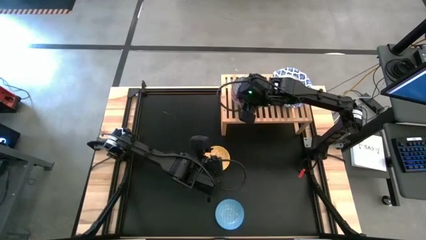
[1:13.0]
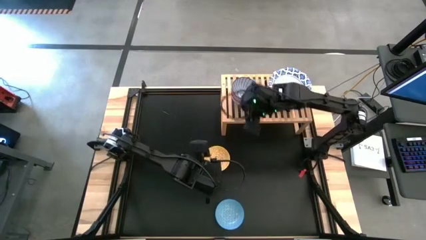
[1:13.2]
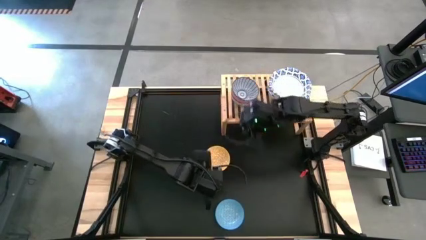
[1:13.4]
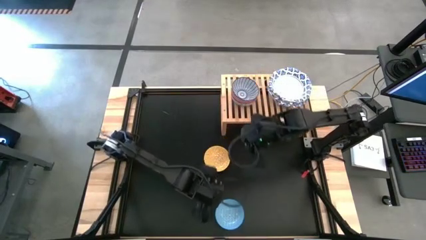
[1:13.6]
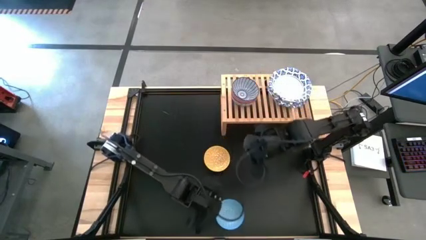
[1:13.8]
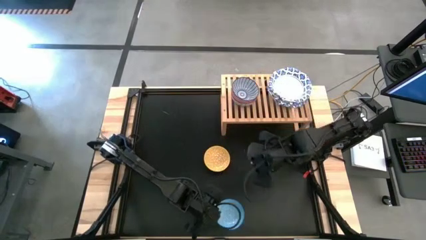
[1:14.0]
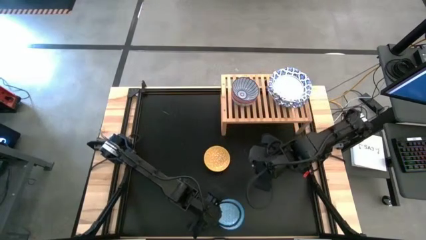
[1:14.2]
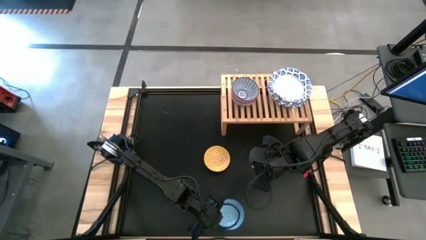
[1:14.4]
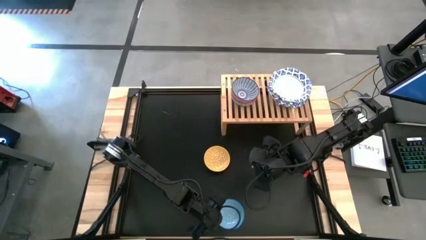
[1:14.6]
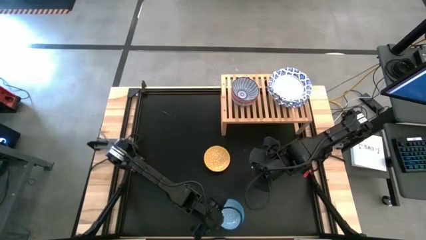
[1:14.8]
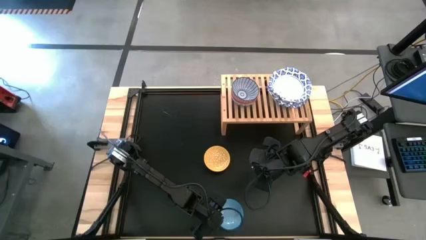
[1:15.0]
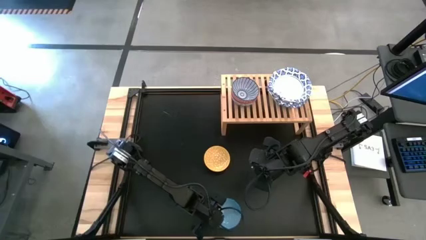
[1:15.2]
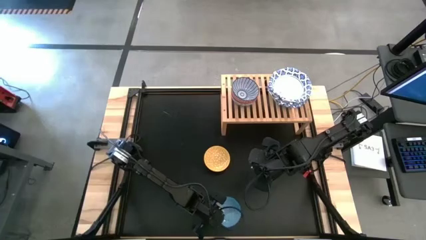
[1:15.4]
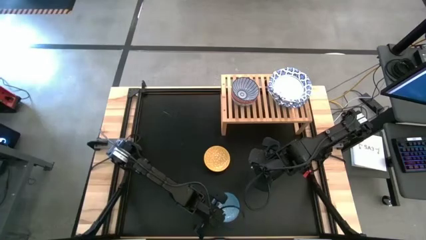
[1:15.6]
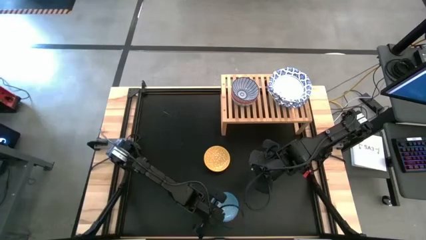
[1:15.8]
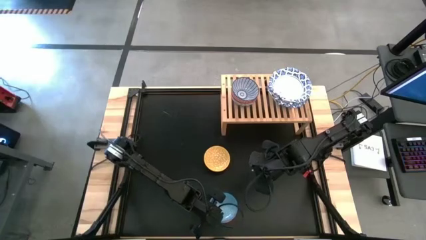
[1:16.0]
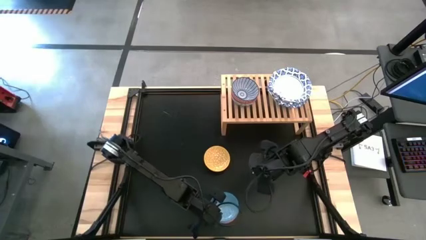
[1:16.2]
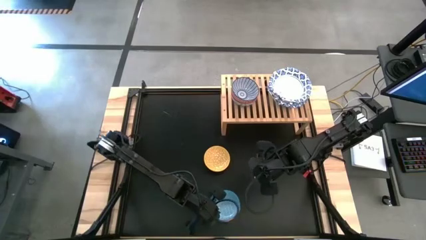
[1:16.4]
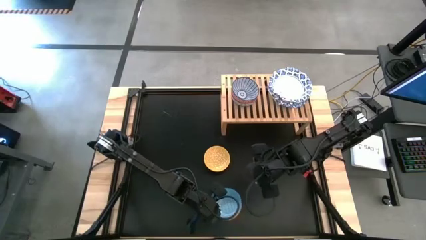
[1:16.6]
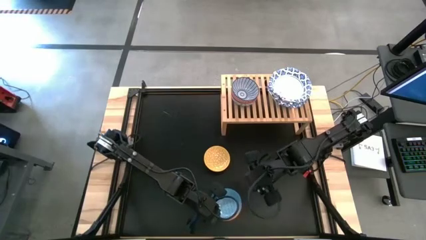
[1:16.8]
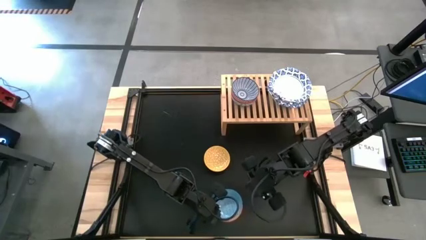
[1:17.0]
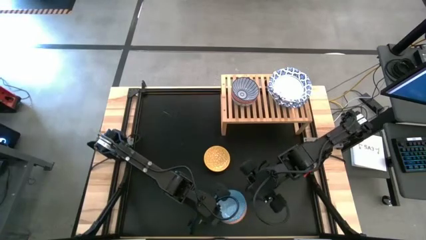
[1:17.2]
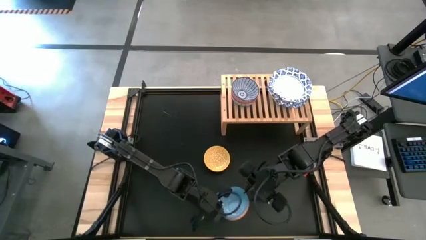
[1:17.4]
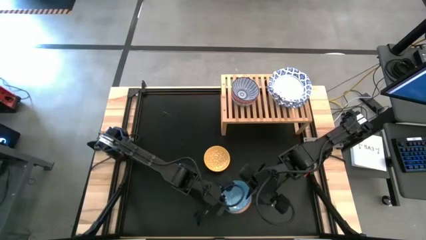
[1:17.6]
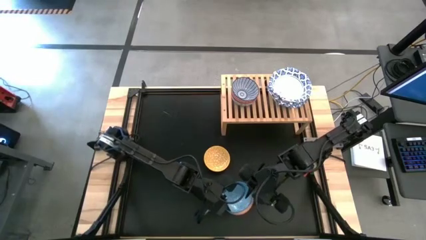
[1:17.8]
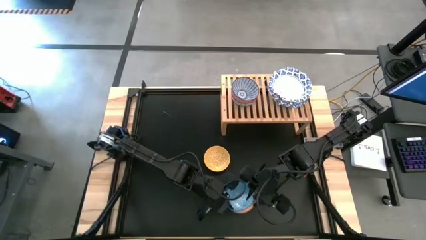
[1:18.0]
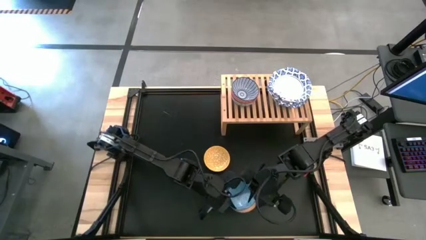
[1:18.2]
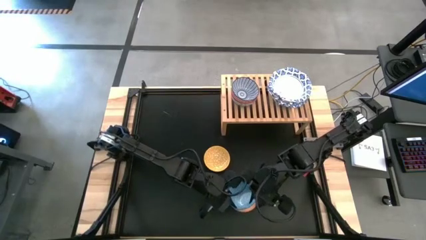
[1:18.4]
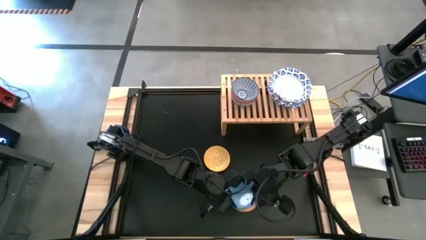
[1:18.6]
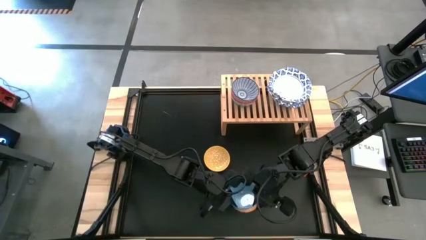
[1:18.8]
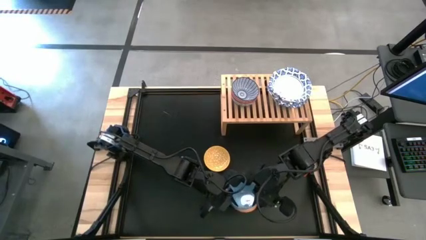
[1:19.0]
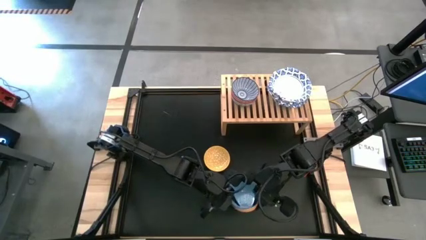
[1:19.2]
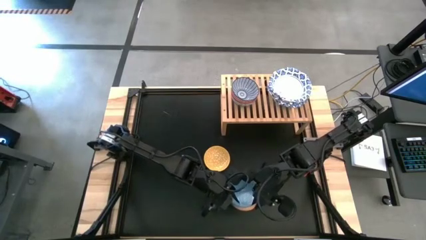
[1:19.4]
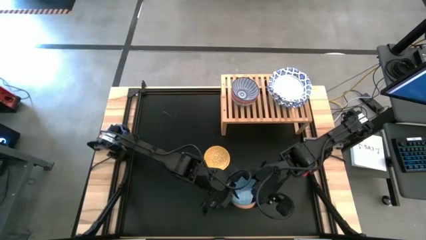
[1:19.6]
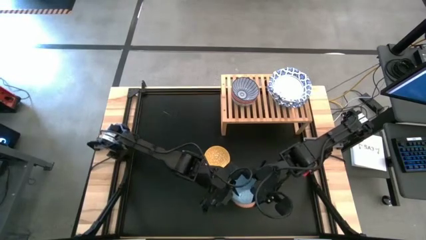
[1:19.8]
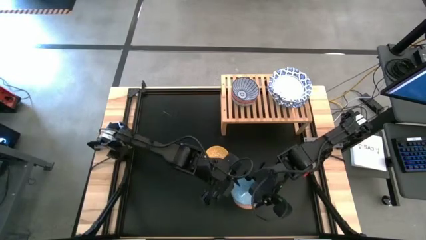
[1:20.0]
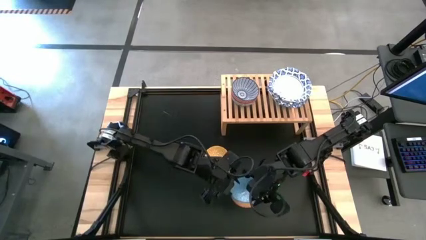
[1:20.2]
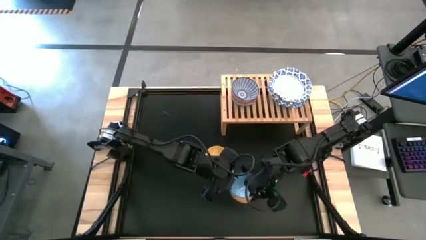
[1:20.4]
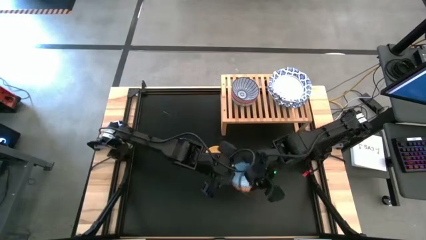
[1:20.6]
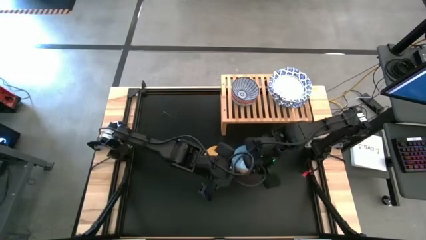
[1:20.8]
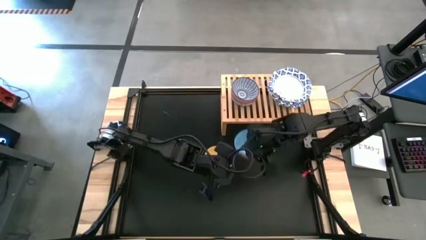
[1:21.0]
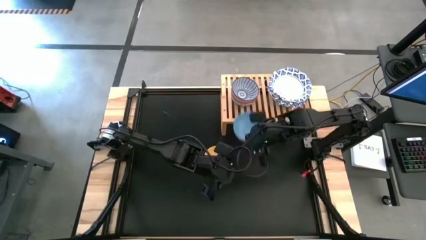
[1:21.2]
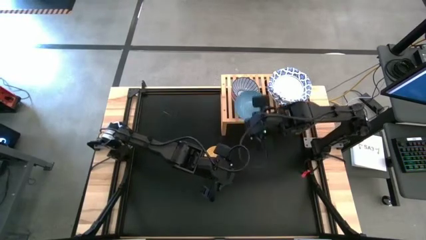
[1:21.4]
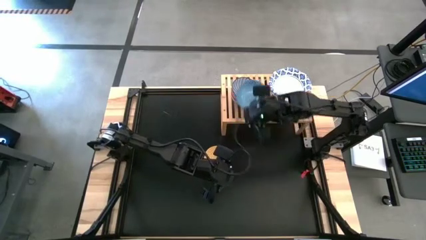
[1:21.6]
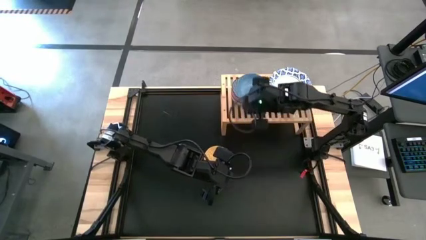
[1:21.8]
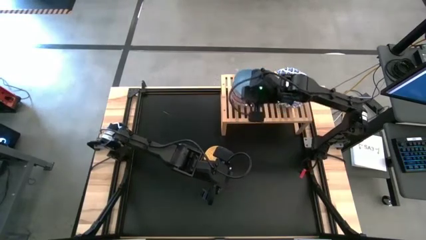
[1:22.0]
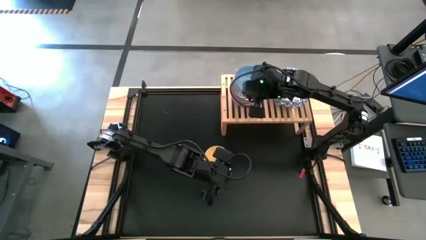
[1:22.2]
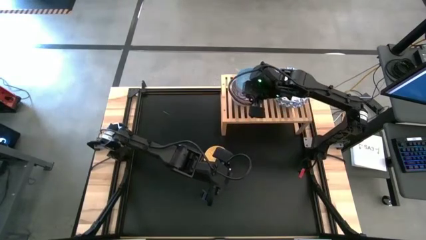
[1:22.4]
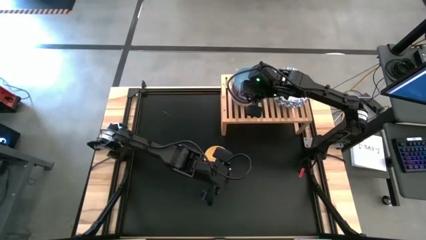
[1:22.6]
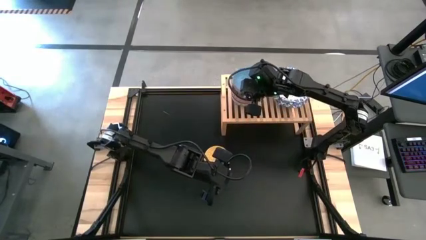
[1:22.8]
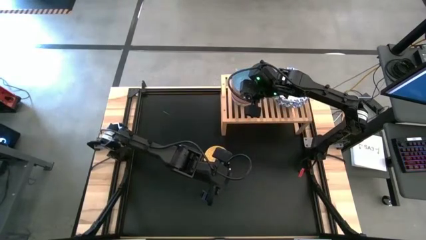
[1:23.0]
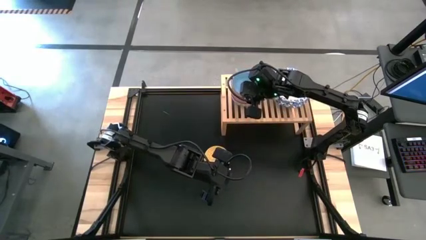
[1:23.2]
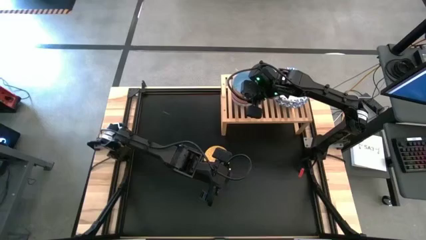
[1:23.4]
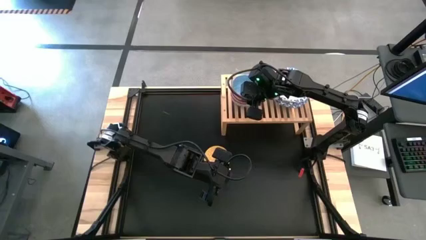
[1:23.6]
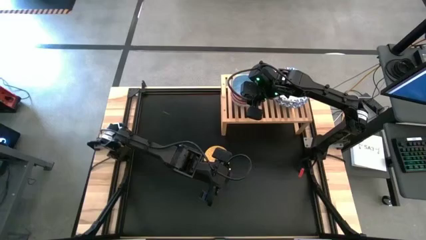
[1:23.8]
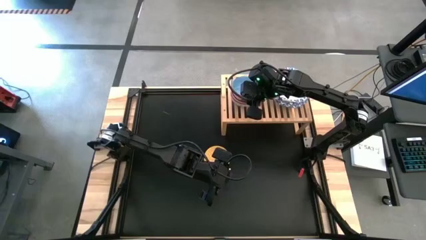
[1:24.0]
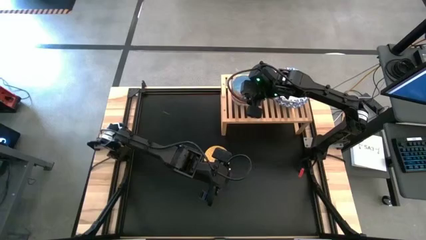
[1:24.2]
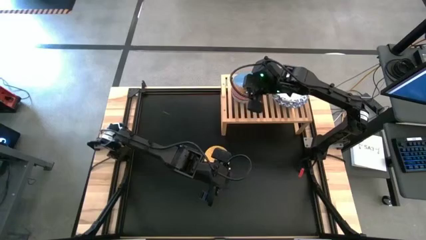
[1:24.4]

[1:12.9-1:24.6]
Task: Place and stack bowls onto a shelf
Stack the light blue patterned bowl on top of the blue patterned bowl on the shelf

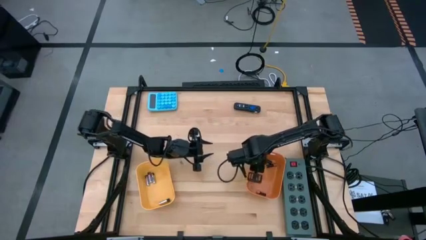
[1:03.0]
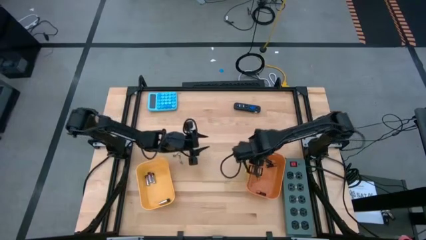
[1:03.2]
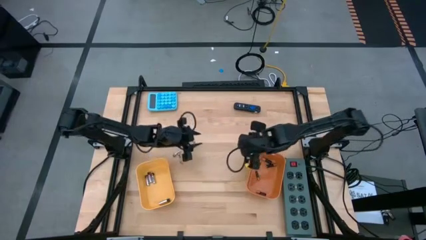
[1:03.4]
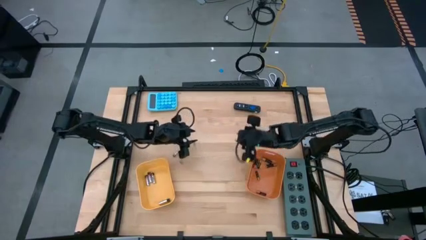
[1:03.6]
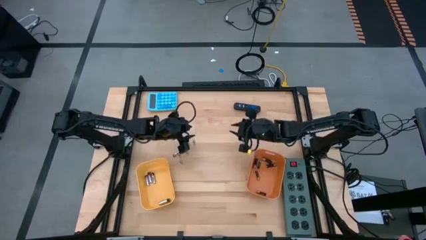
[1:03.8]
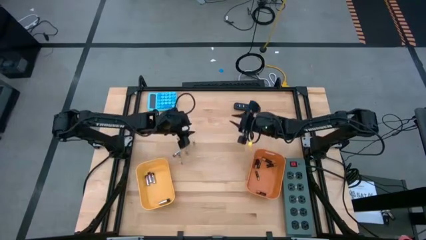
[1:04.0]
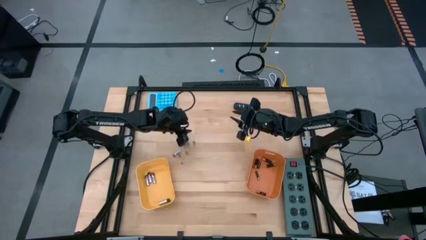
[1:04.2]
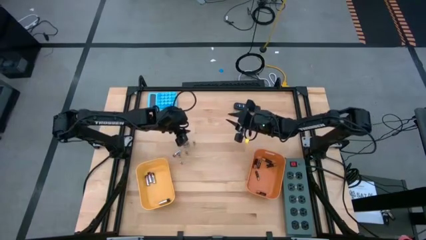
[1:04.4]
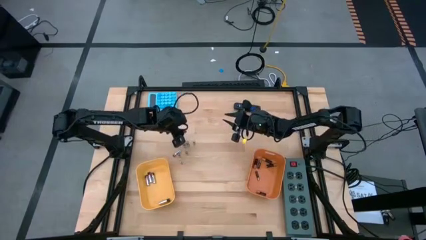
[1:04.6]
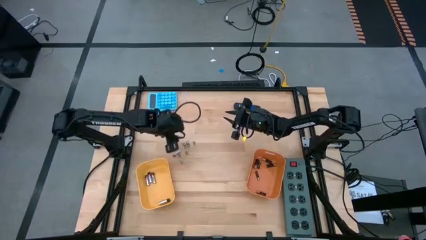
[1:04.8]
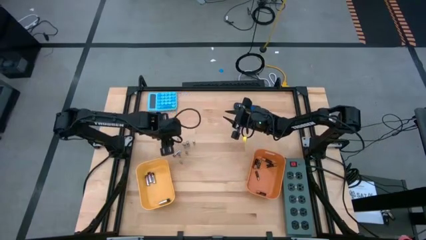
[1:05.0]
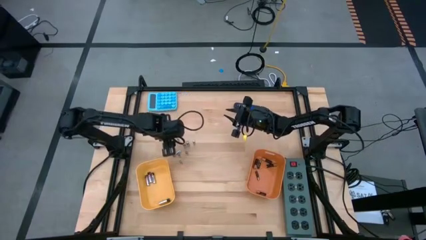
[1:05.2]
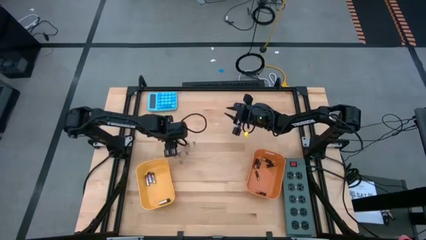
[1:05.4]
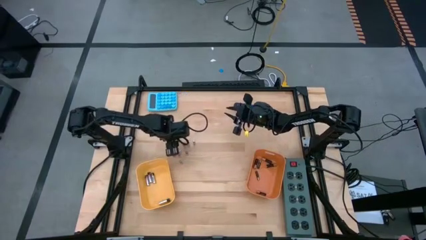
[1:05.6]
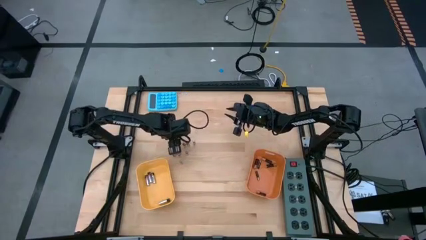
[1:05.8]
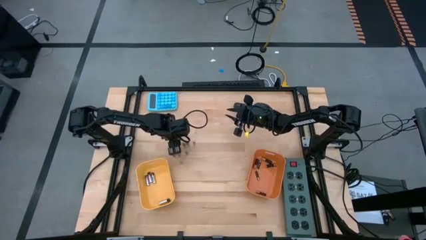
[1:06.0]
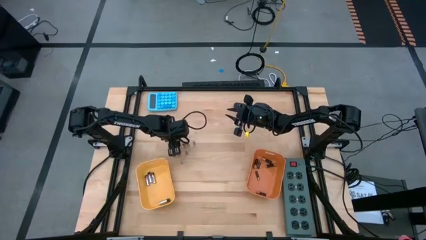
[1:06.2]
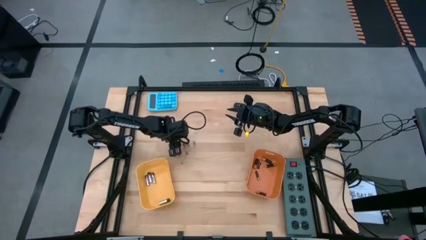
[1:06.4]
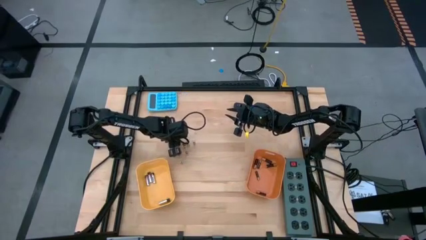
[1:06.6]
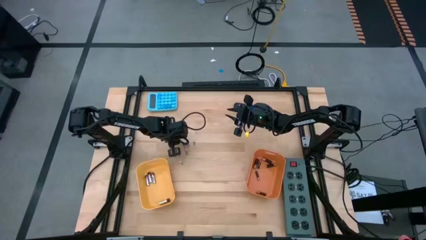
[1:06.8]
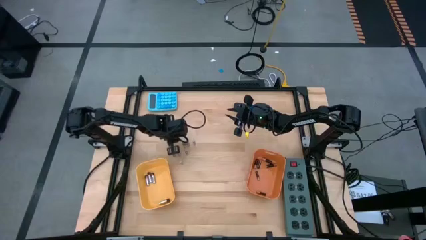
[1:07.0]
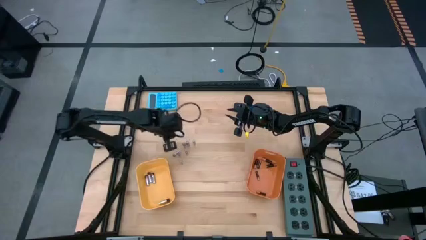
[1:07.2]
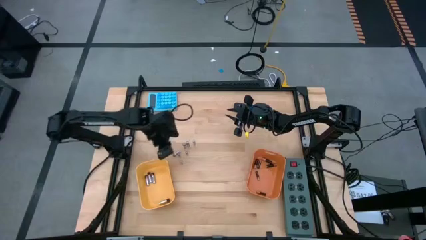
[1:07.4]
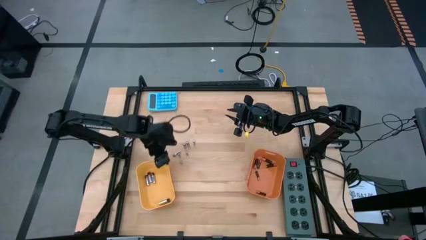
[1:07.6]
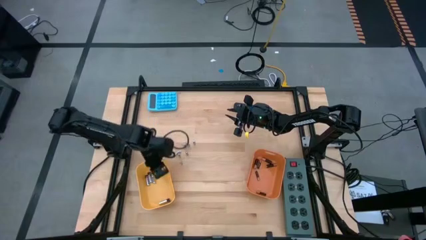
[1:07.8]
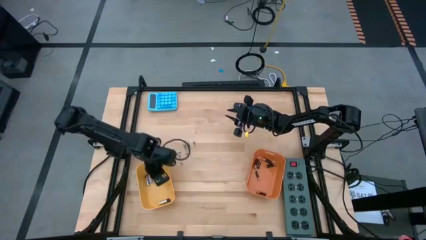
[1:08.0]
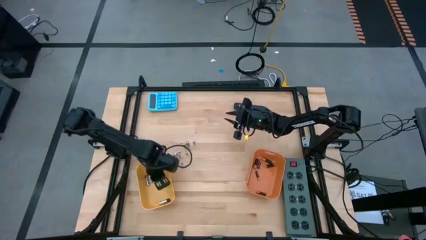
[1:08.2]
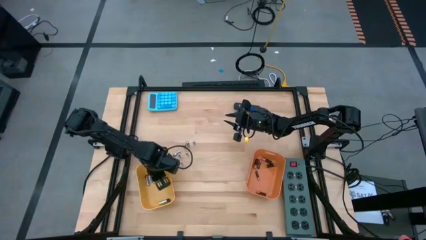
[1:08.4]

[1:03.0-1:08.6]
Task: Sort batteries
Put the silver battery into the yellow bin
